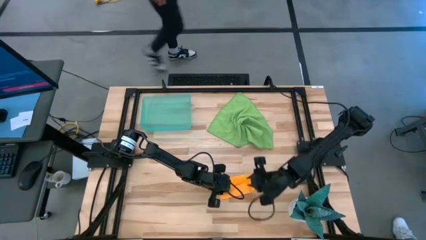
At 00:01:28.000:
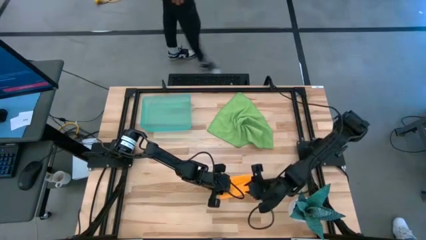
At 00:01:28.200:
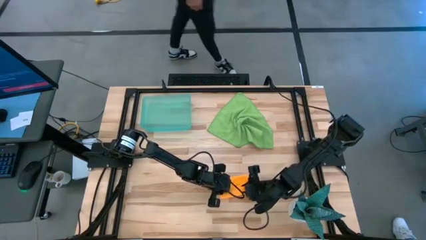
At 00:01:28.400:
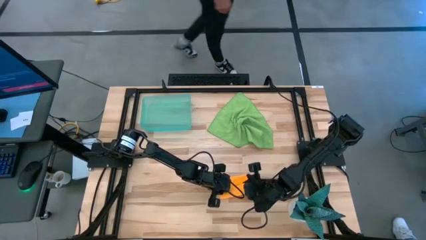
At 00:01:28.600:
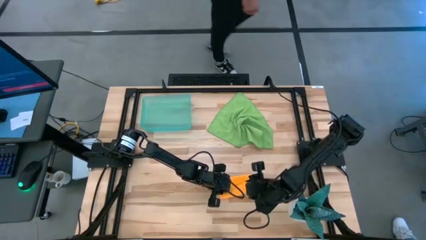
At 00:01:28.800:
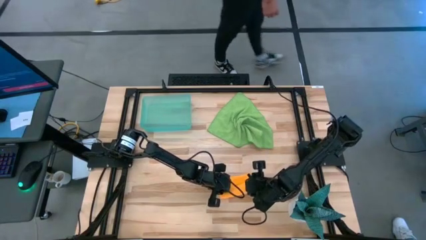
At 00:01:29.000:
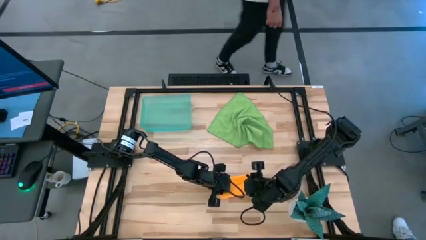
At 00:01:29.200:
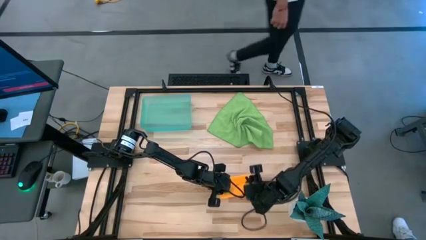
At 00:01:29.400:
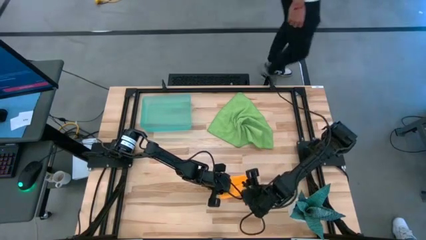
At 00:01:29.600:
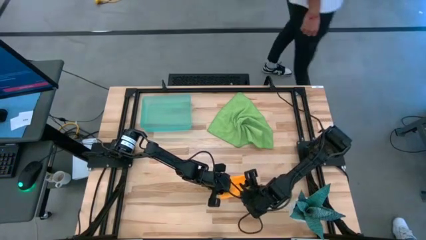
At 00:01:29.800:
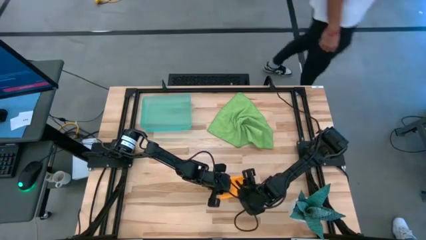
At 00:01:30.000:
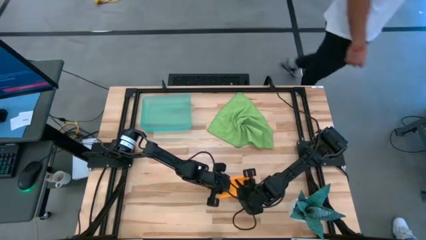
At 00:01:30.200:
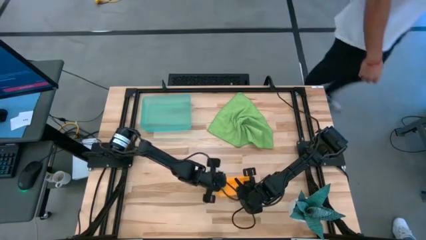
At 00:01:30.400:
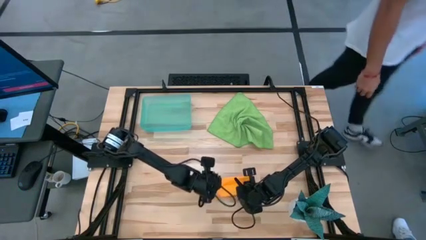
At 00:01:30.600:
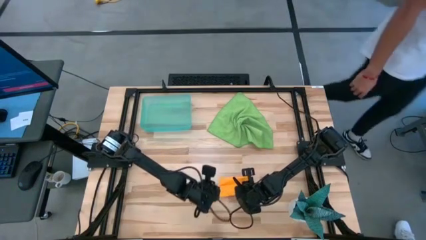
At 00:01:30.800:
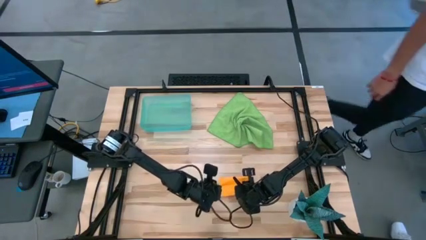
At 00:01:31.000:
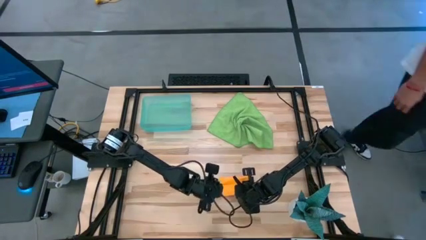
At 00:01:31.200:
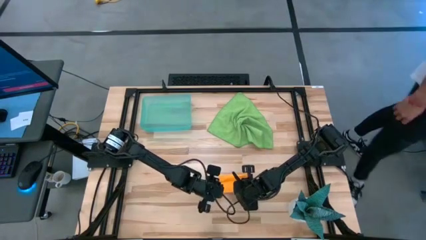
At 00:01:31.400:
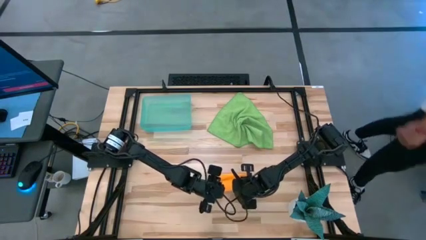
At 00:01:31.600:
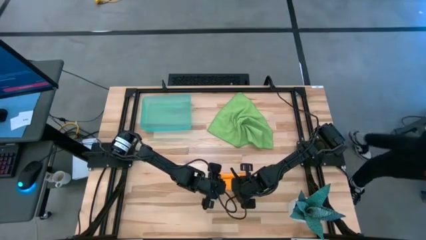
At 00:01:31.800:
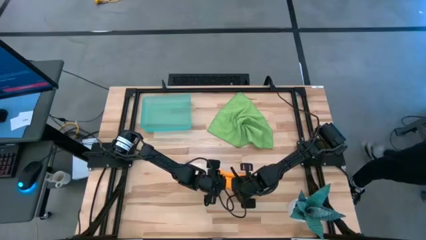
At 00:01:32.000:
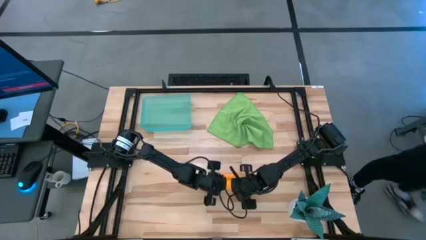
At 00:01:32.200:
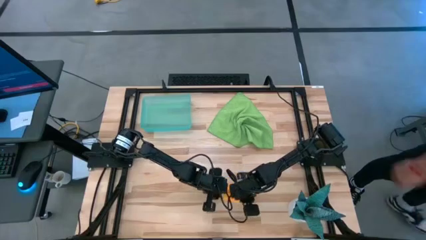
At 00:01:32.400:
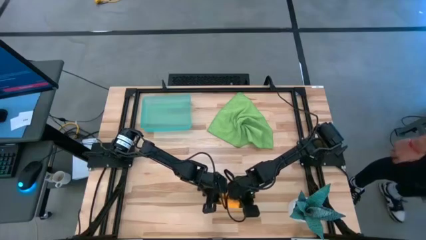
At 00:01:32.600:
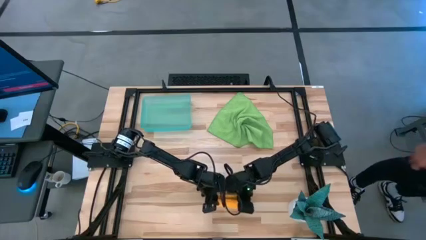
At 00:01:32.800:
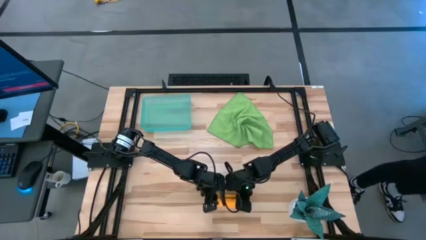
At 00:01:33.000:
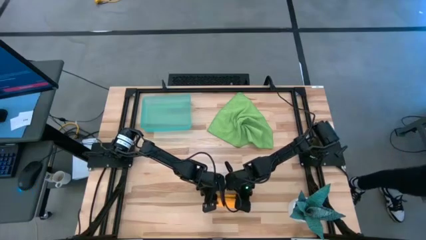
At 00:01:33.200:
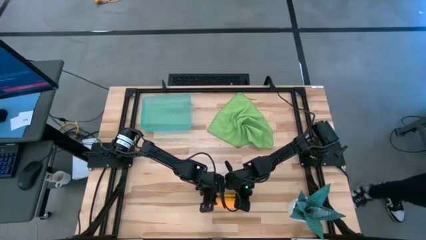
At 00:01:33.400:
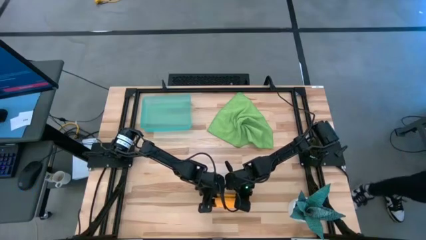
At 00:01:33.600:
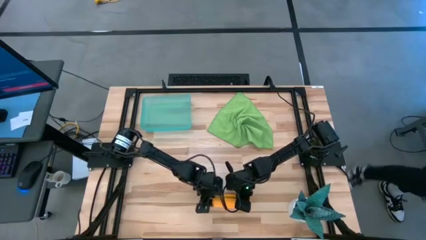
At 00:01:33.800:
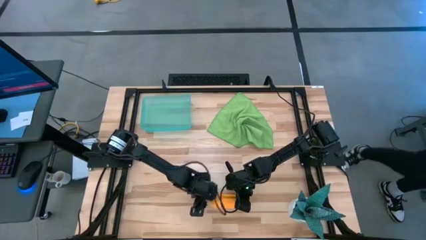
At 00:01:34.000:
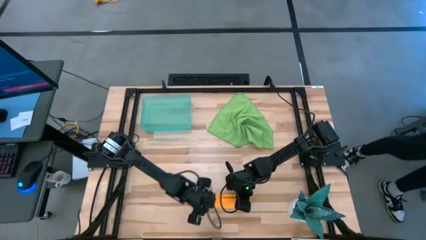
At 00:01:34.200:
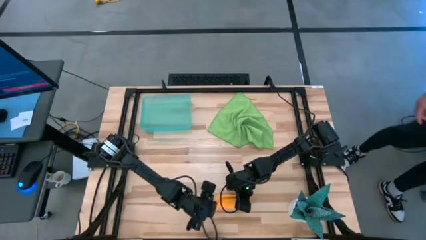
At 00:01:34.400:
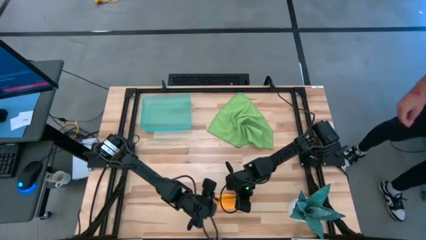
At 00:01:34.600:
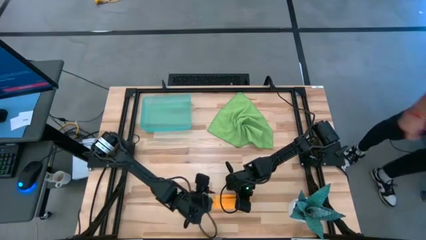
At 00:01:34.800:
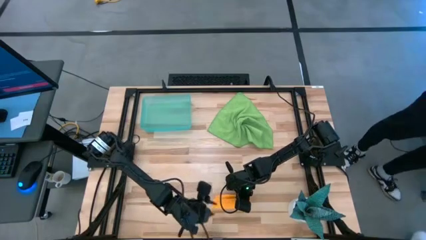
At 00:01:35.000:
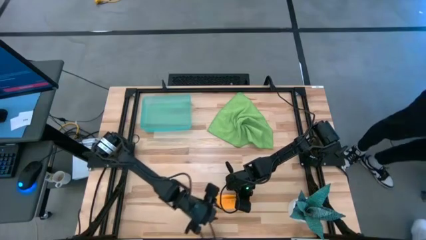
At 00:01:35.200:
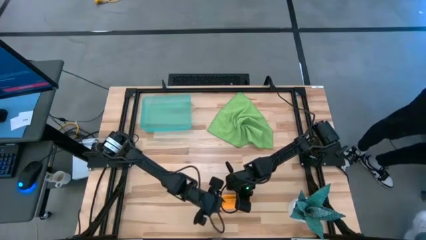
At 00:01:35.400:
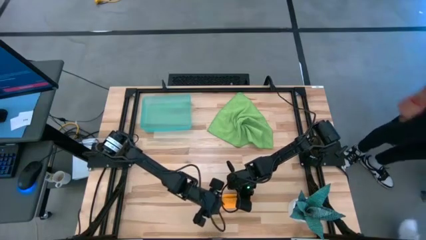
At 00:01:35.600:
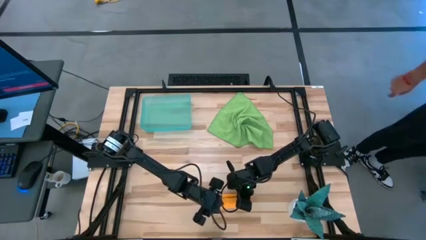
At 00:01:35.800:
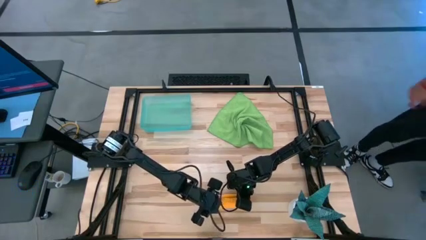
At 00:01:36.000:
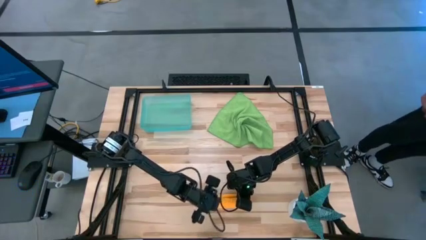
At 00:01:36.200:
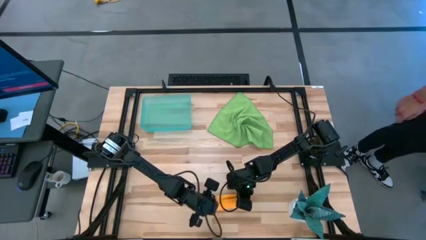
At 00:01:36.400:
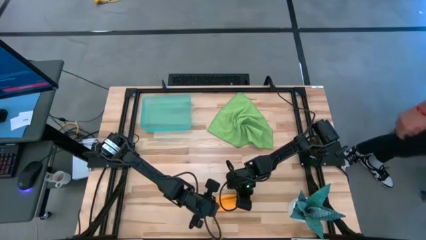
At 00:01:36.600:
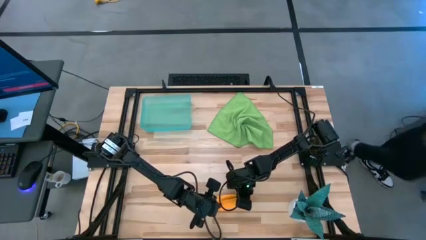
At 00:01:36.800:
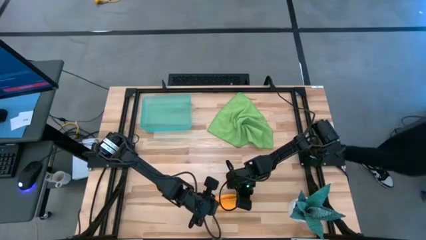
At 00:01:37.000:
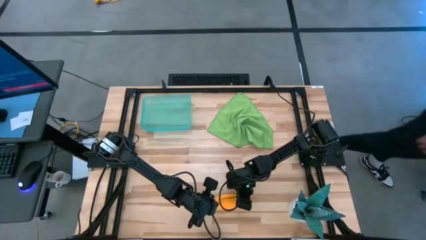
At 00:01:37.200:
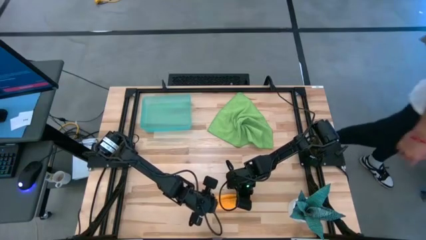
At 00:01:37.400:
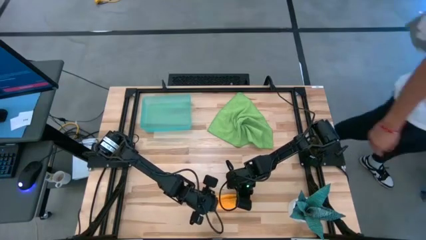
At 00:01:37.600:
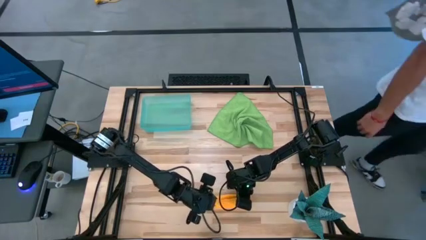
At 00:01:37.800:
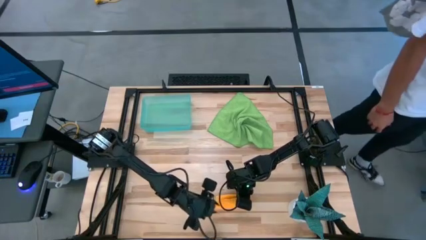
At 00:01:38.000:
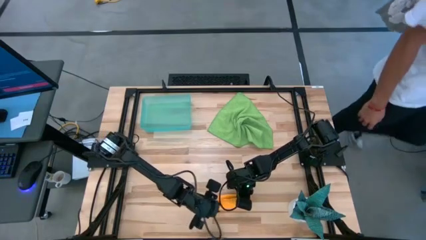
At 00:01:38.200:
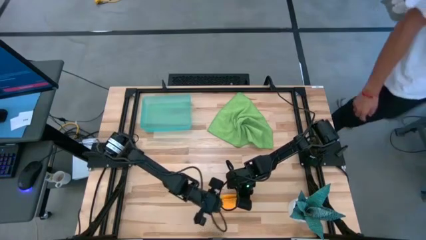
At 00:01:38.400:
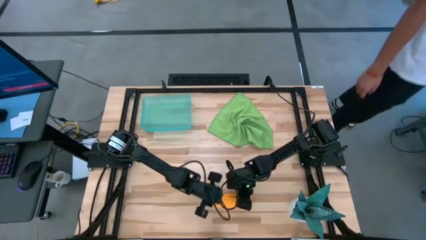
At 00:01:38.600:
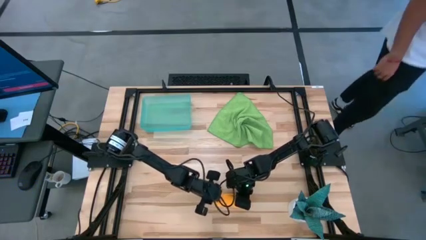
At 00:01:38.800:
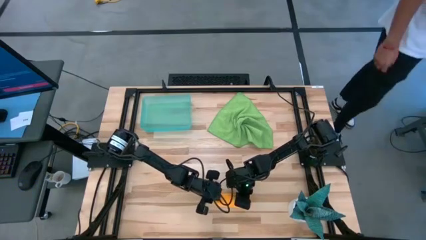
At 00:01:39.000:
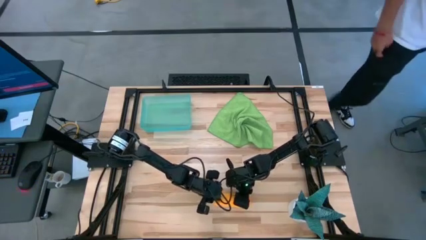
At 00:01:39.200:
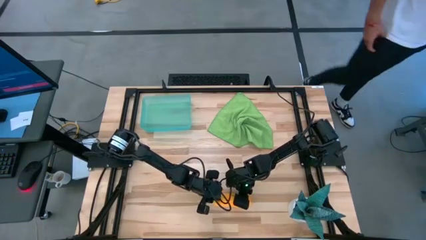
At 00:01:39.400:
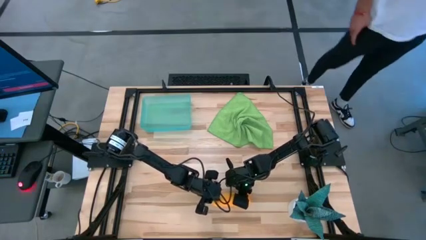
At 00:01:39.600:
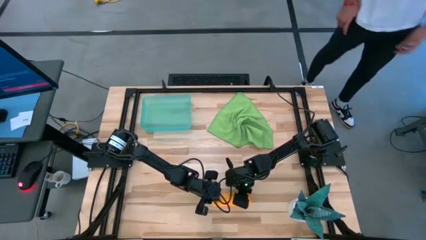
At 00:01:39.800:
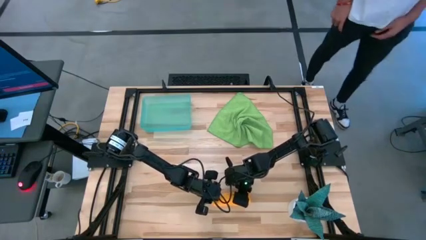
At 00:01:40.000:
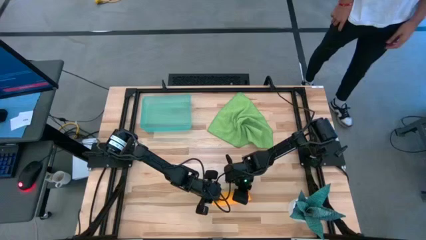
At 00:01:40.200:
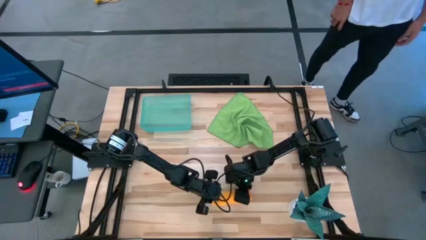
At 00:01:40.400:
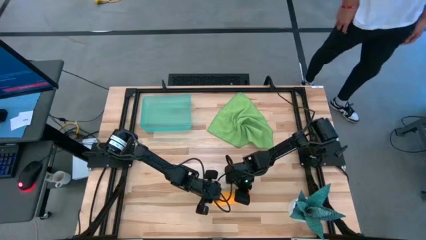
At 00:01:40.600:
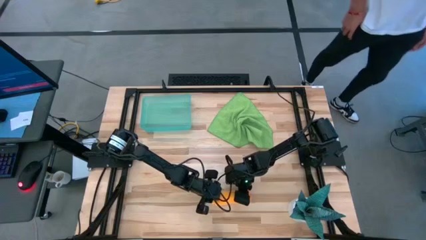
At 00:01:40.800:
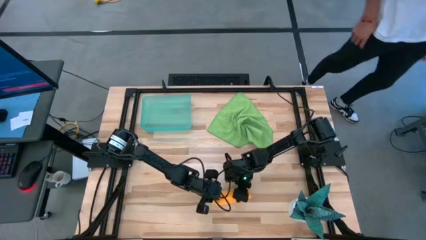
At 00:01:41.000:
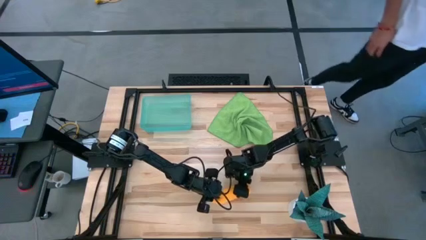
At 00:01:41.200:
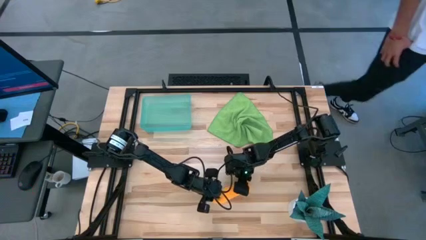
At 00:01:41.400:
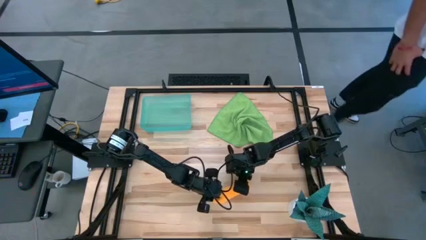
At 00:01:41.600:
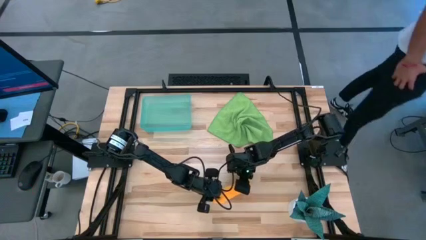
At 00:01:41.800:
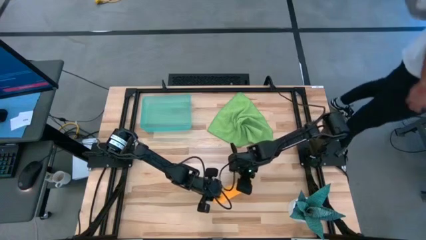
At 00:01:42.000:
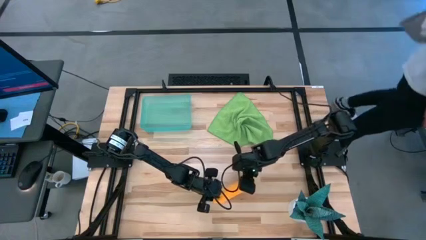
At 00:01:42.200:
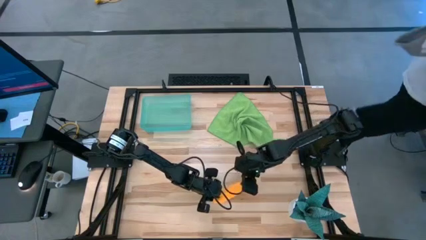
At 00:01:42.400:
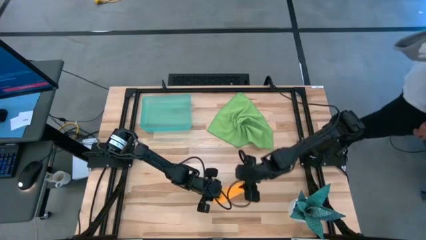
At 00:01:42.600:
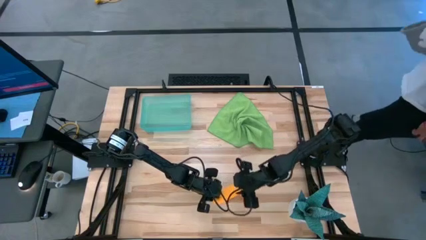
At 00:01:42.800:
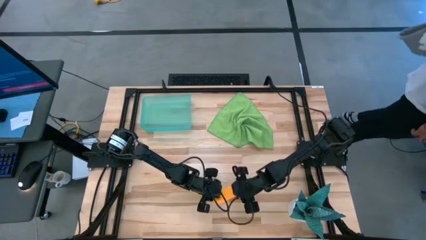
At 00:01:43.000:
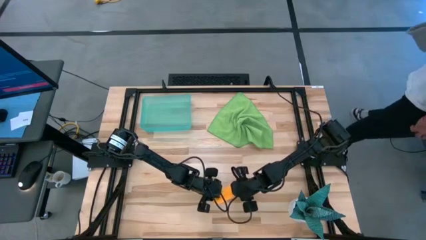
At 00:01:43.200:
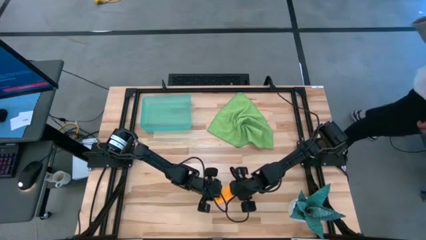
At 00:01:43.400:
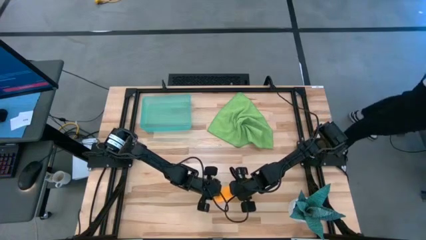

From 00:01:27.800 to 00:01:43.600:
Task: Roll microfiber towels into tight, uniform cylinder then place into a basket
Roll the yellow towel
